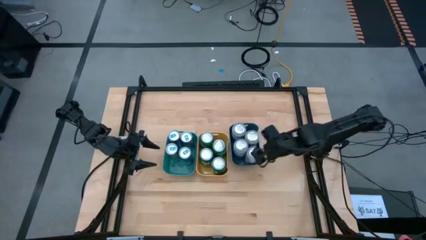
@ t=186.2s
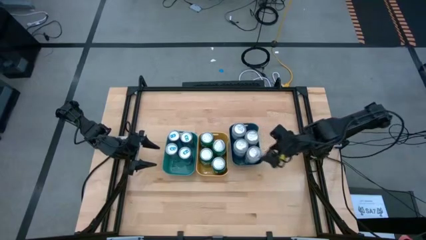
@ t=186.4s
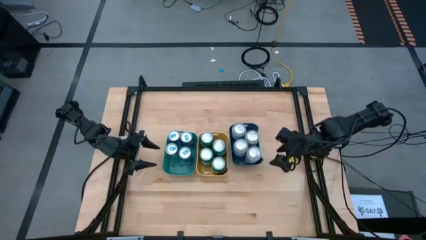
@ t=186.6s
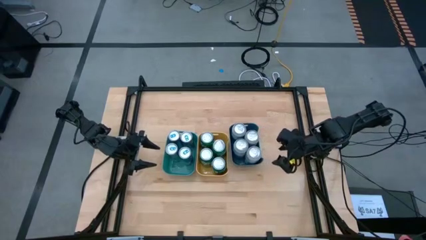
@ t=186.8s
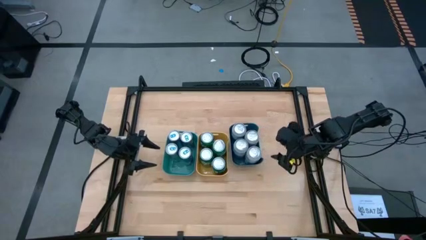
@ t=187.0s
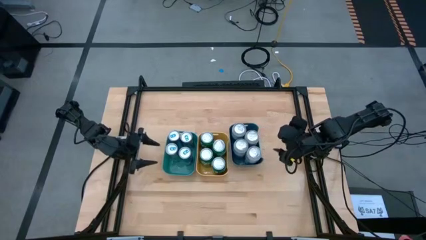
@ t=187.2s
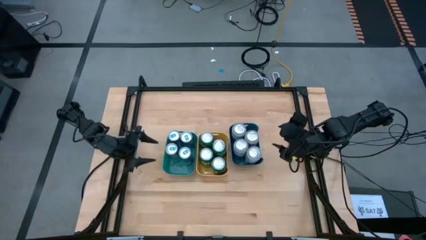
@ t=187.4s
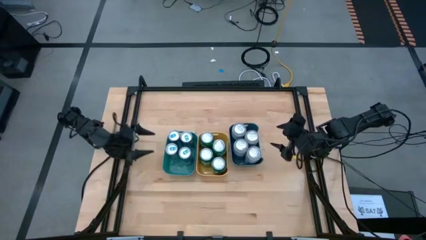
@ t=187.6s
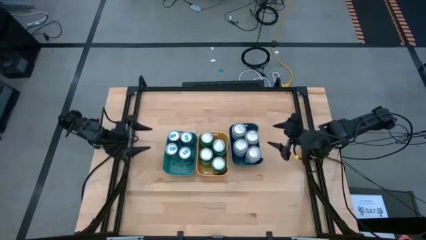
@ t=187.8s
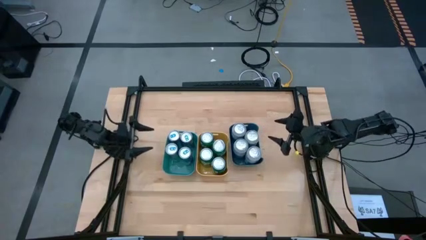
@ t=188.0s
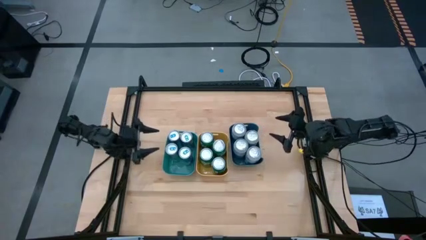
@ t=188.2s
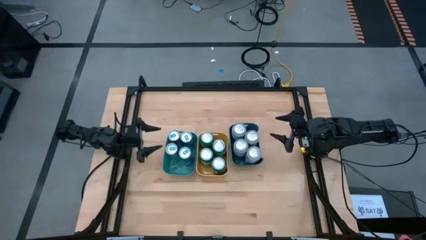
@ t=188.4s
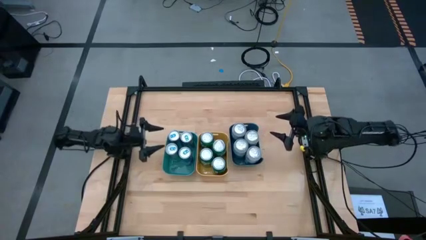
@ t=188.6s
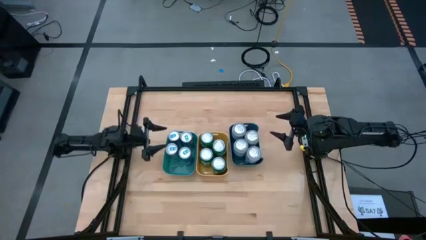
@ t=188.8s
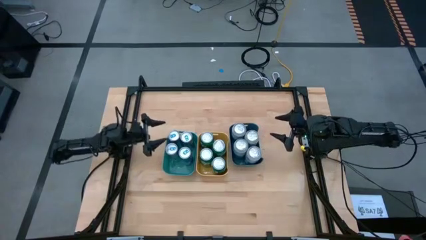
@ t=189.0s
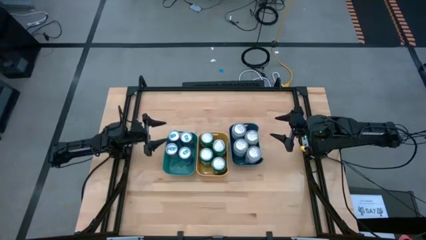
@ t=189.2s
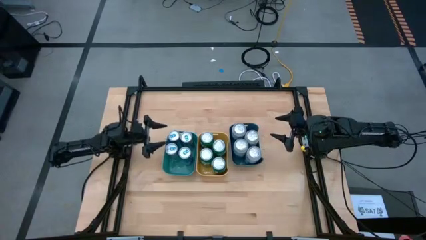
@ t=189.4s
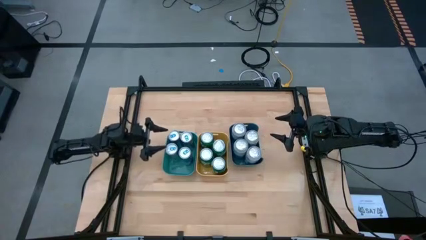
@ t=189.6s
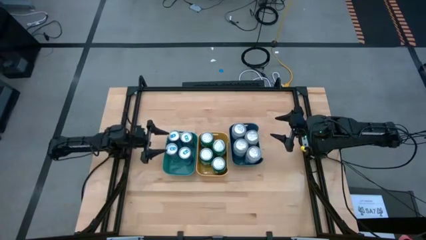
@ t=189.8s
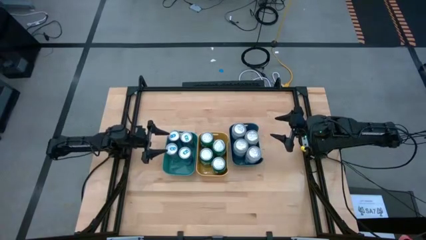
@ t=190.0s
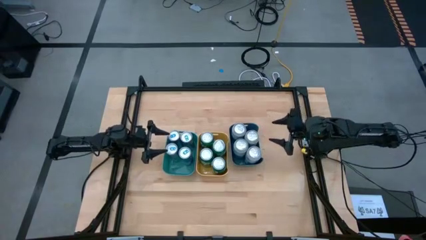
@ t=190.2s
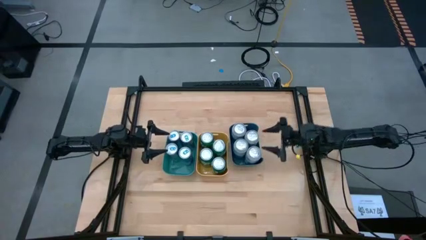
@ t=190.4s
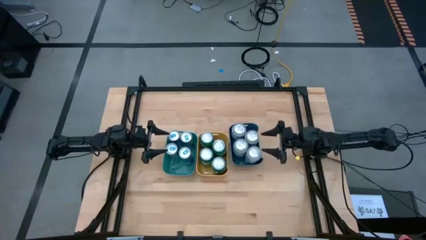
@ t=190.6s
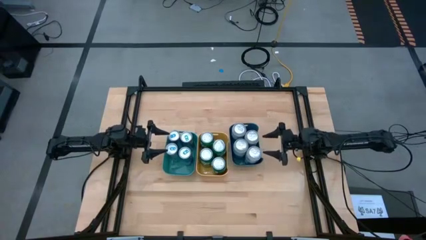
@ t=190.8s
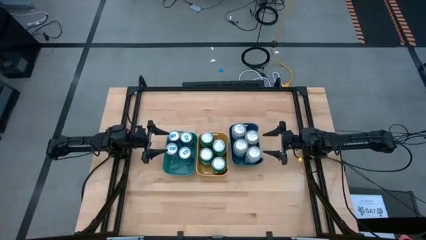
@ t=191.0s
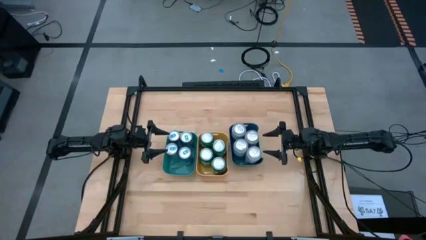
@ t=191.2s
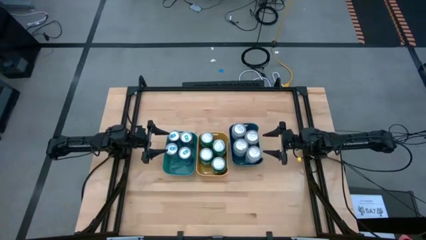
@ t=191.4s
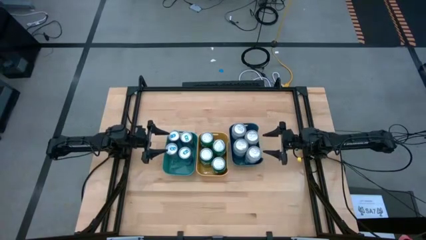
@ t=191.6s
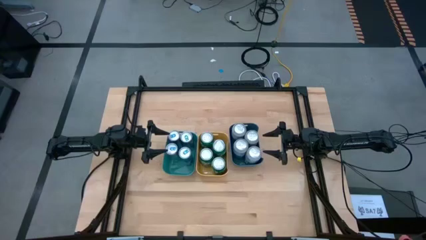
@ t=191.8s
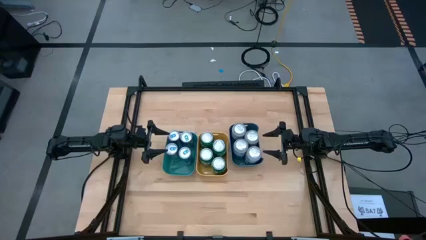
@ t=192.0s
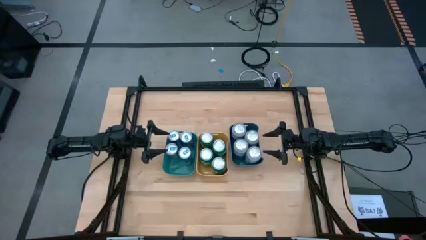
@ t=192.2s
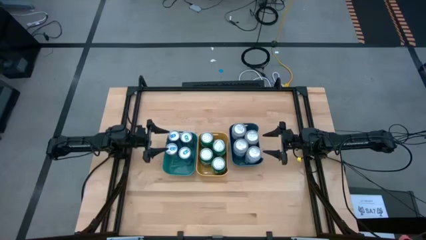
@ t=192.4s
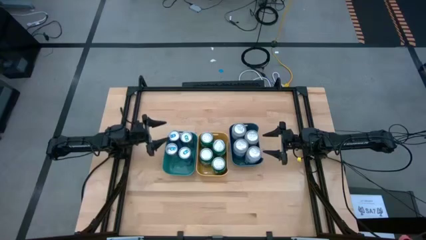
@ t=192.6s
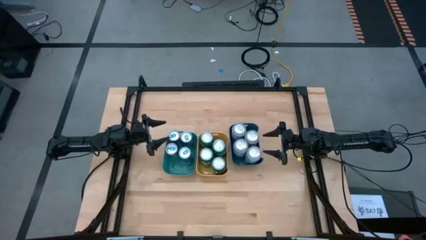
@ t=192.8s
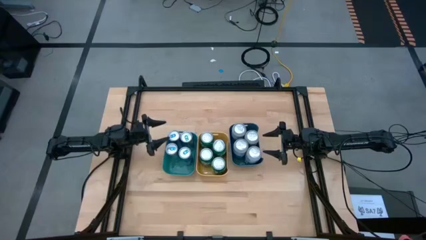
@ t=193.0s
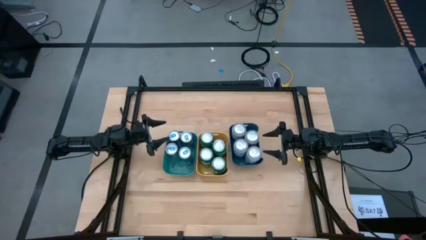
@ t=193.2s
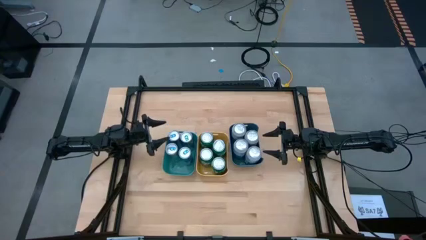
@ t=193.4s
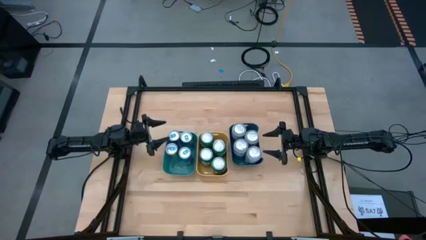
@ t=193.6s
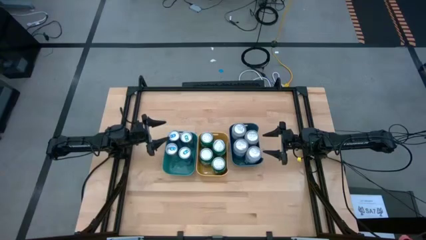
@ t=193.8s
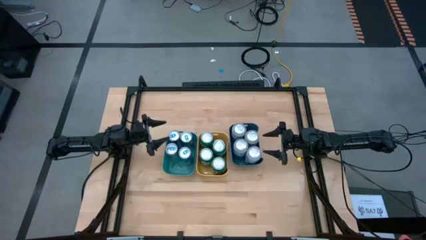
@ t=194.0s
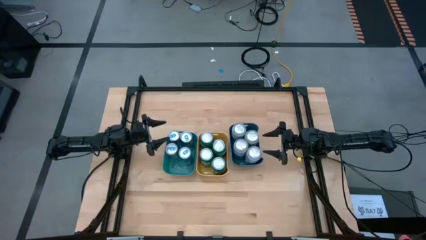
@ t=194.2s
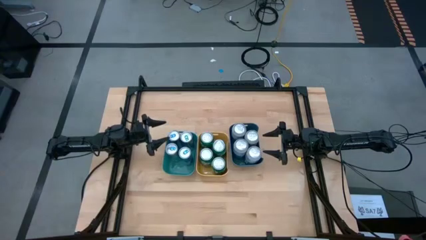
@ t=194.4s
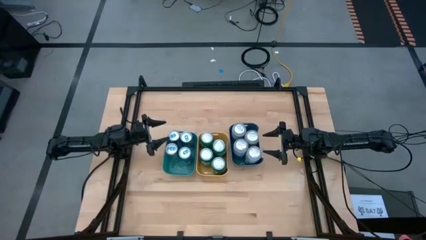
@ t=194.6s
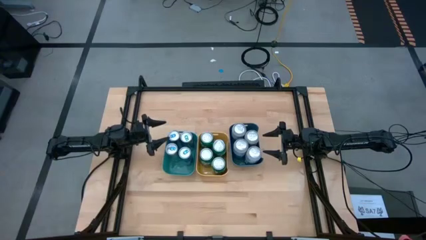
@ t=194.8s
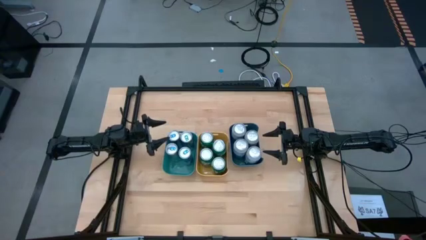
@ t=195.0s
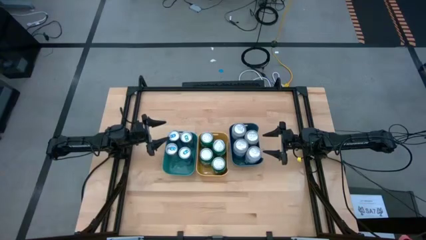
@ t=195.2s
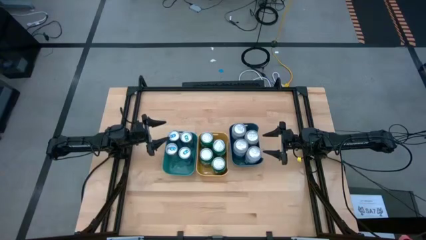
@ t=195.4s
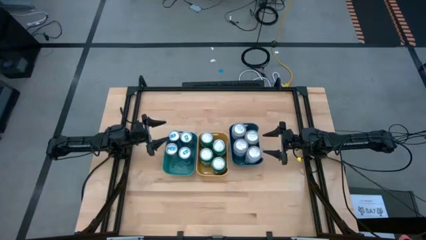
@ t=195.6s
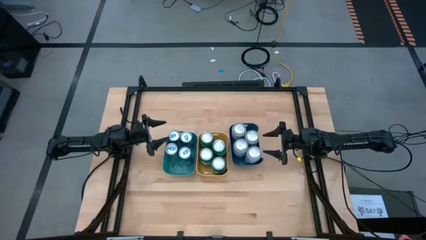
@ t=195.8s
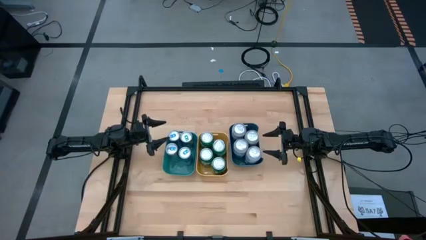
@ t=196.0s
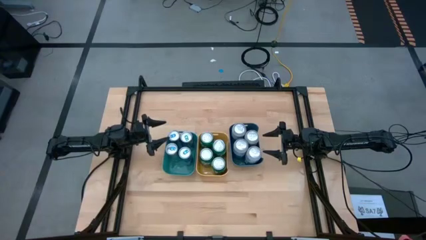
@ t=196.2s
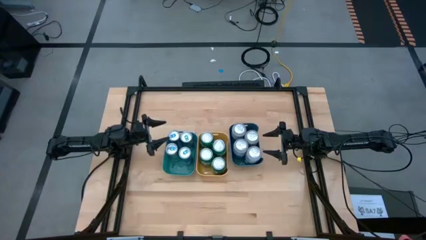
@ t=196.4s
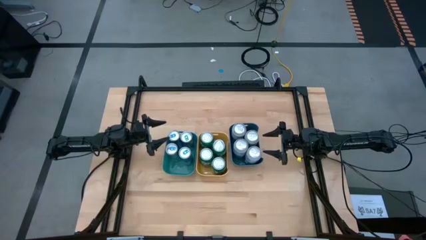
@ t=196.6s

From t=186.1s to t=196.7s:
Task: Sort soda cans
Return to Home Position

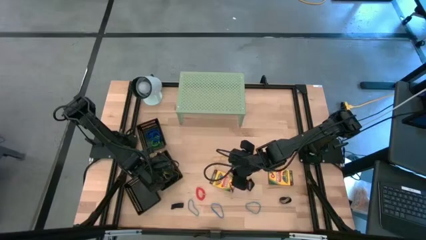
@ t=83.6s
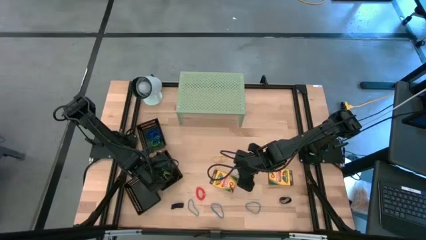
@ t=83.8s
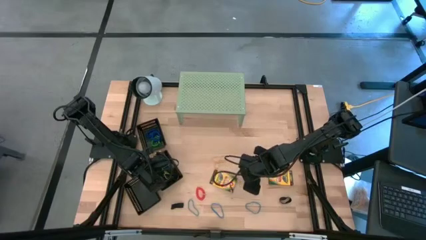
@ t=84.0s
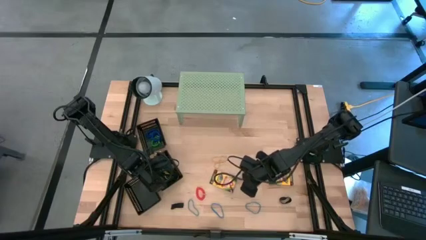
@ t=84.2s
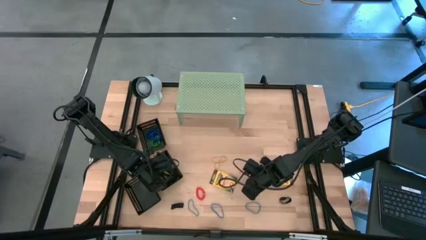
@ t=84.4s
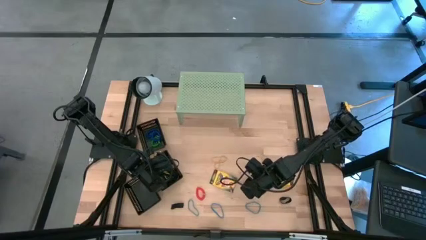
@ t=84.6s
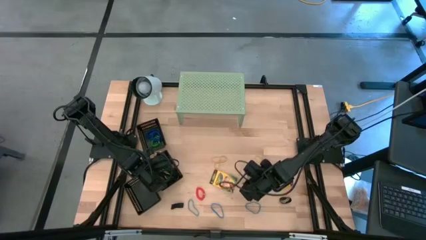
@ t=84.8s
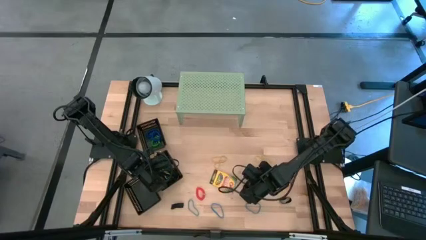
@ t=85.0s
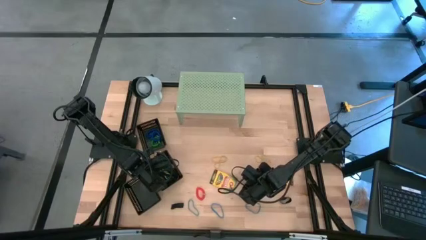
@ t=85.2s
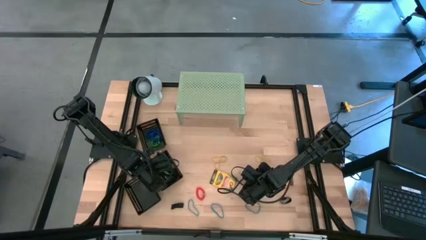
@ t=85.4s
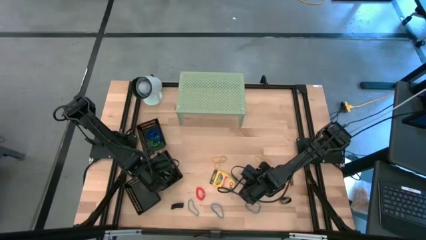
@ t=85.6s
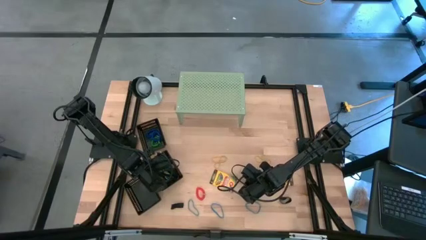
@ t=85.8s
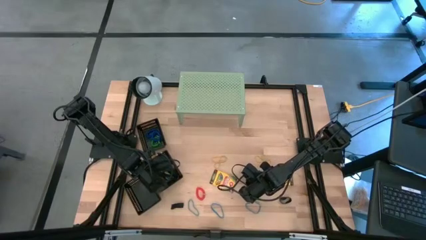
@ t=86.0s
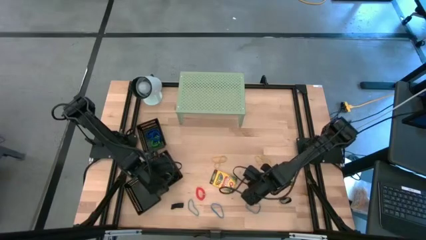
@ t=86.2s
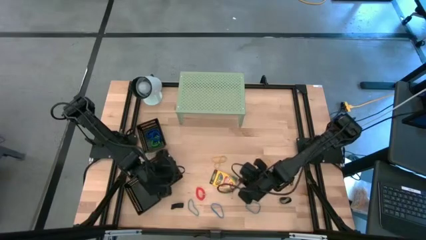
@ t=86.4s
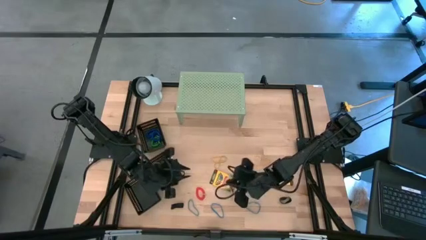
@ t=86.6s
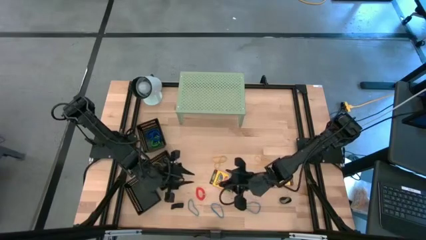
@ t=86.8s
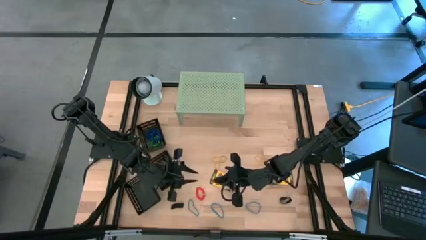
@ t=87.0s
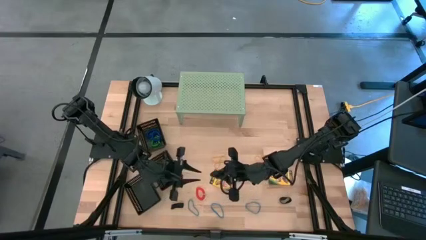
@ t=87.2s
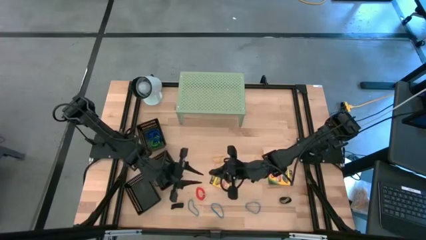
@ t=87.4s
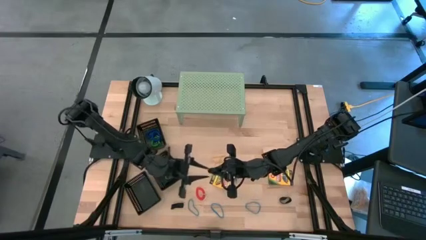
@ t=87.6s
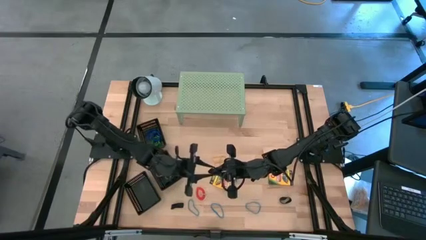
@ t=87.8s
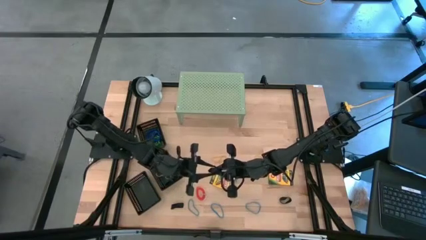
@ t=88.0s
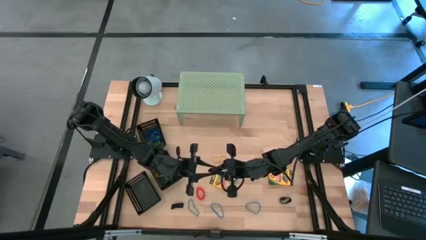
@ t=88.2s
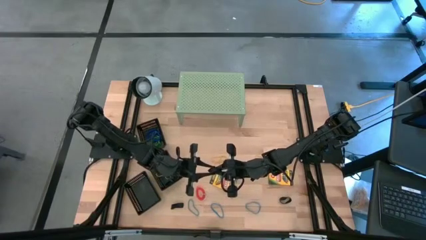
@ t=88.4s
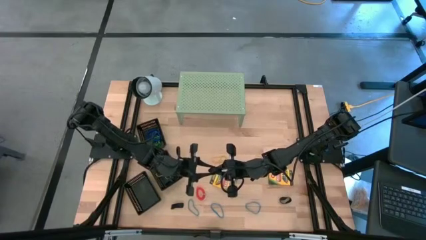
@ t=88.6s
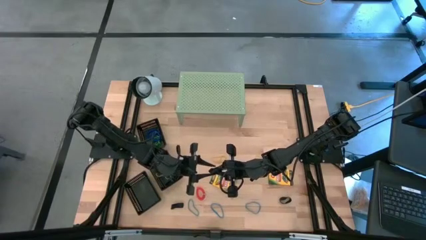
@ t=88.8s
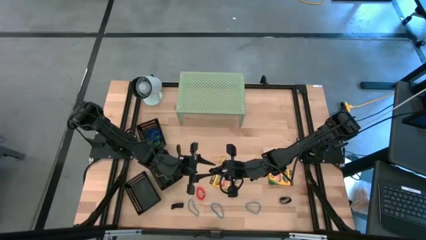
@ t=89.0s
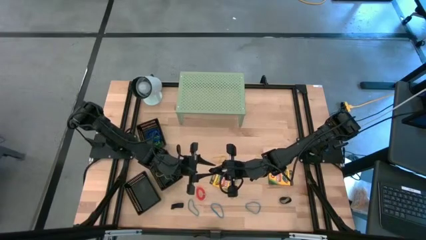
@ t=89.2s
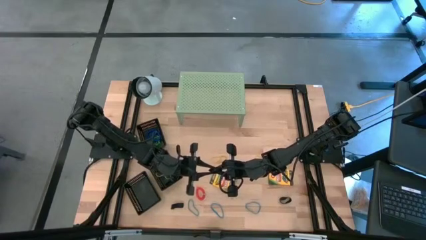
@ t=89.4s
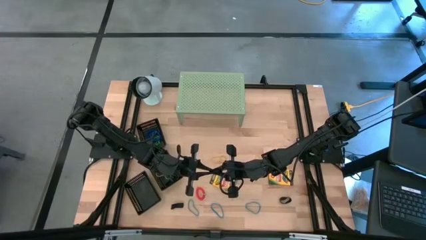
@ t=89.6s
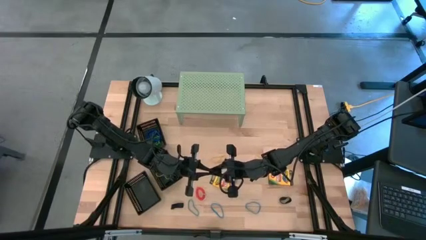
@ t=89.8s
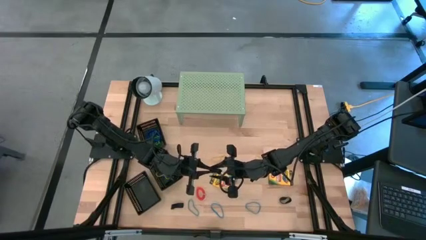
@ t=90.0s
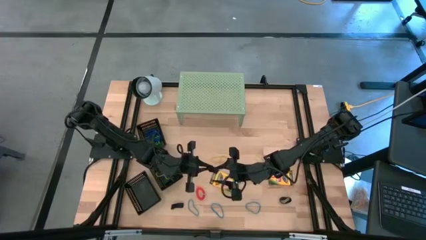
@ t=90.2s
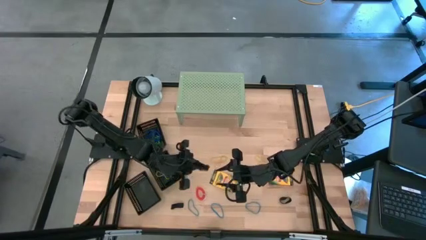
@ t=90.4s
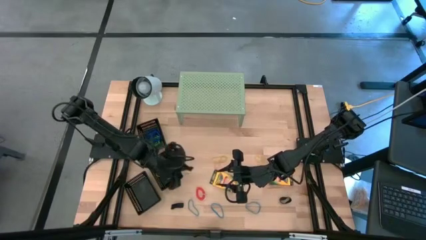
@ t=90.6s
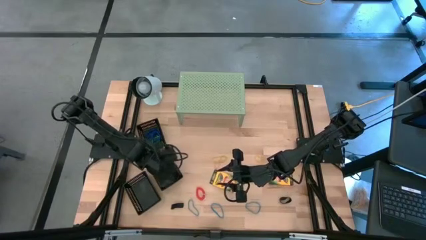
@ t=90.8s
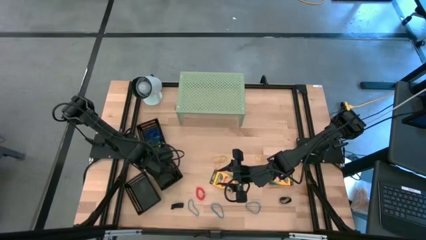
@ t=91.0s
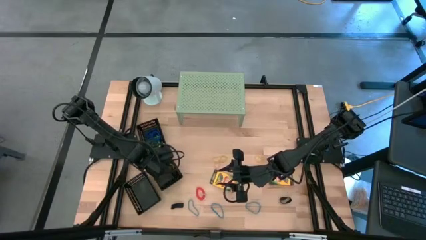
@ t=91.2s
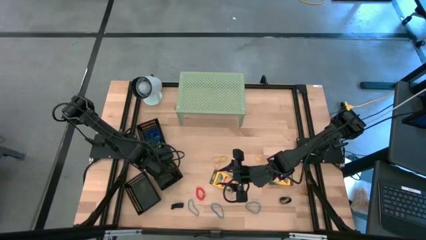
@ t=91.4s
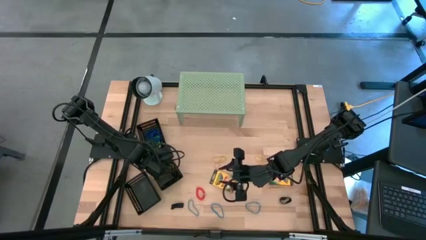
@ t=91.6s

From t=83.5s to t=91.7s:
Task: Pick & Place Office Desk Supplies
Put the black rubber band into the middle black bin
